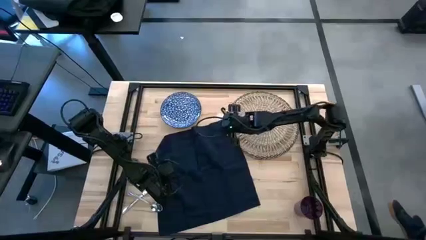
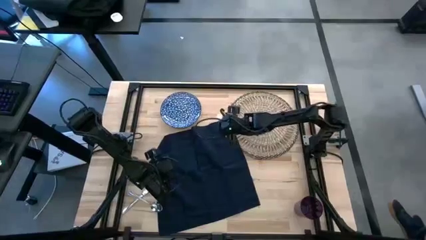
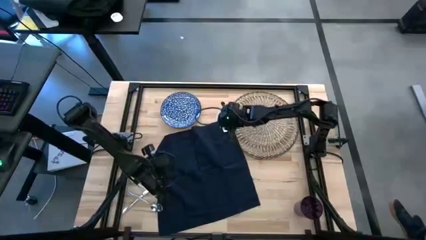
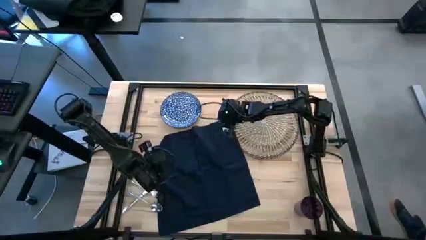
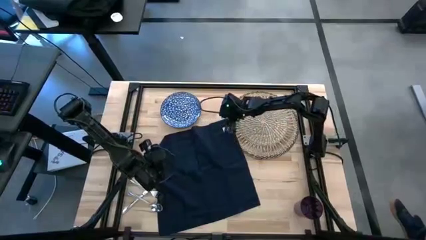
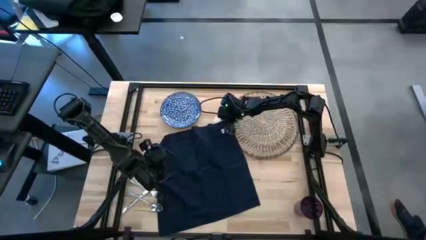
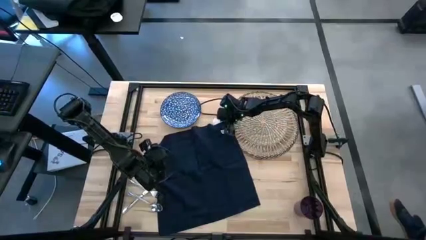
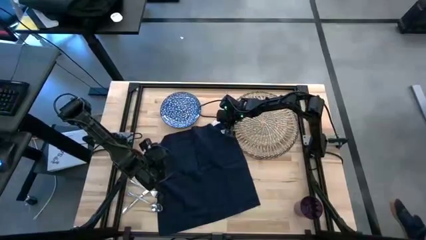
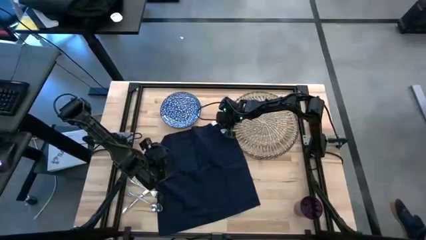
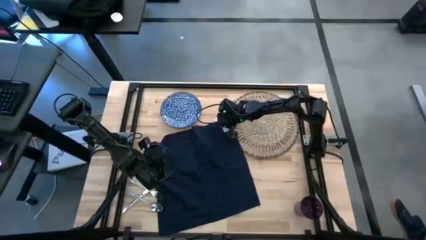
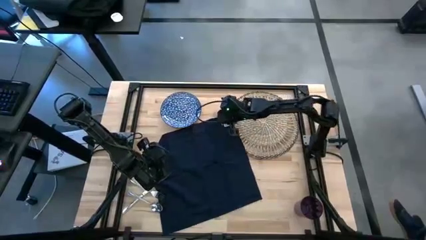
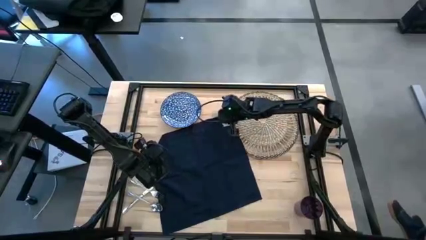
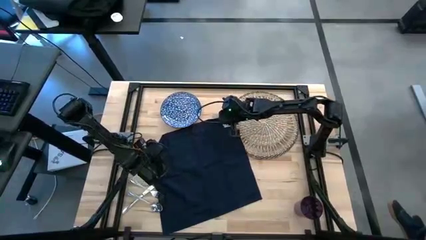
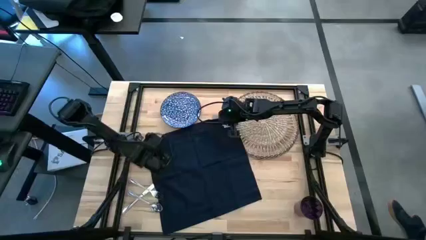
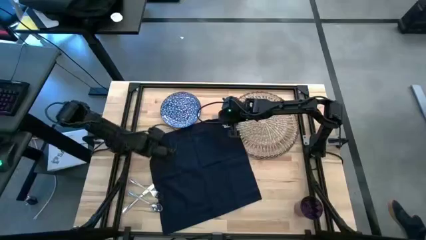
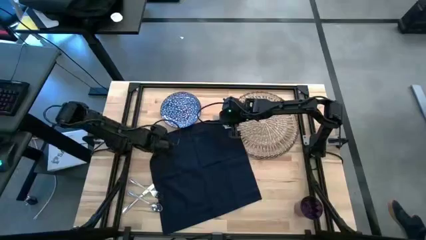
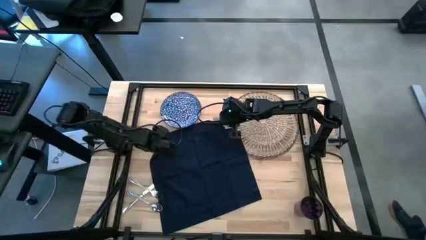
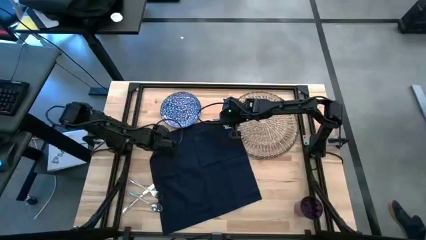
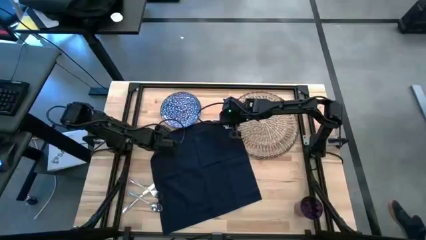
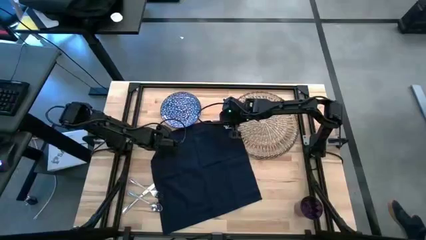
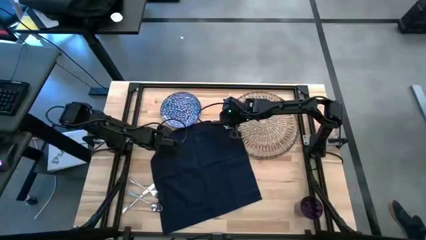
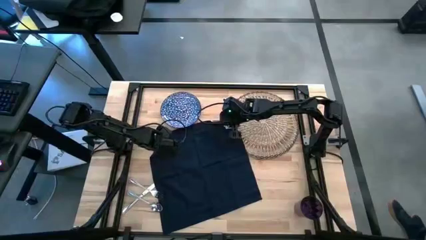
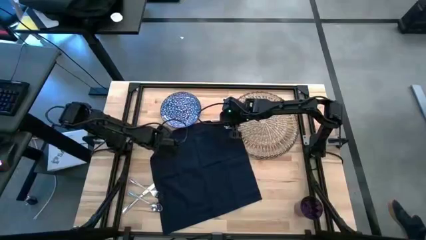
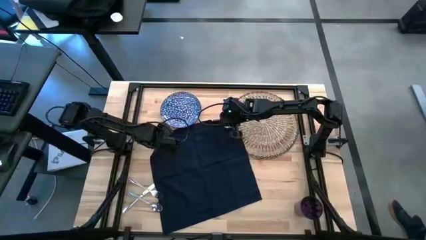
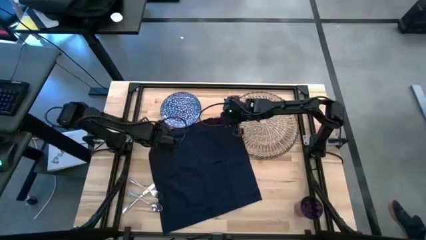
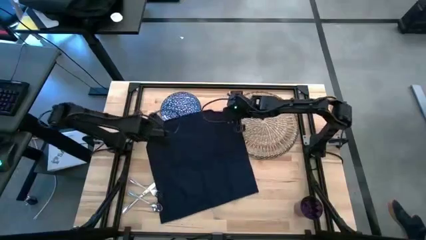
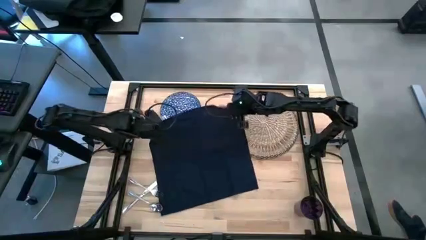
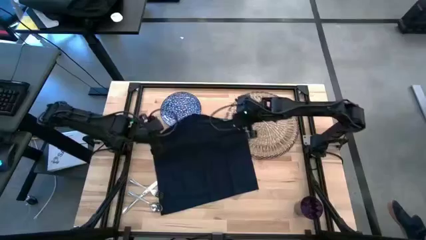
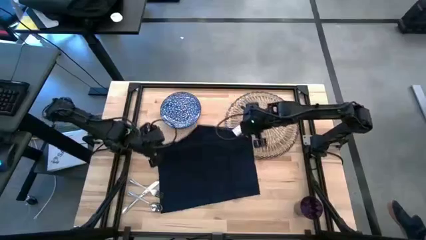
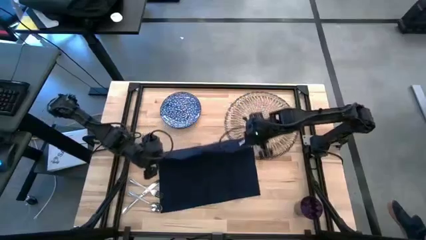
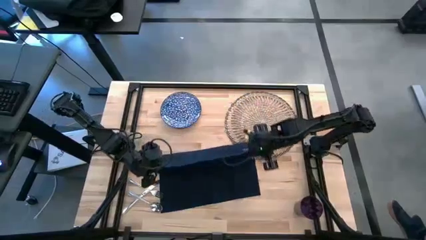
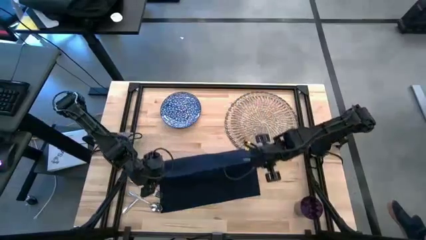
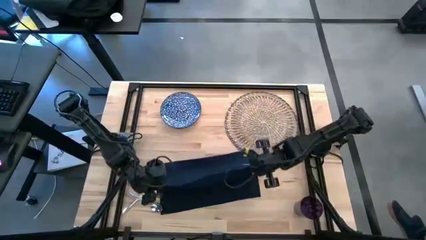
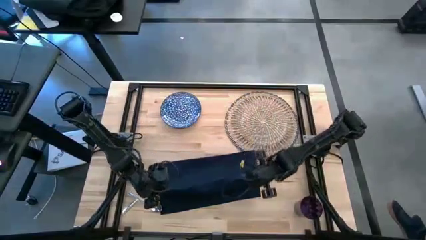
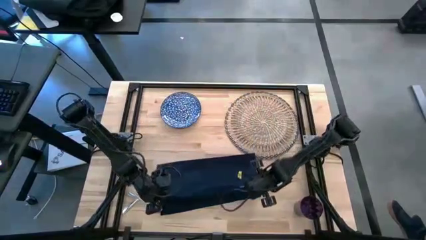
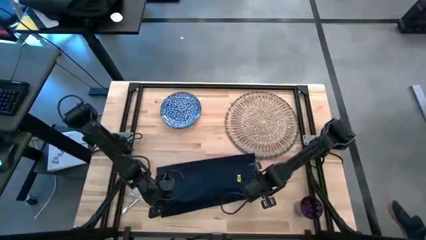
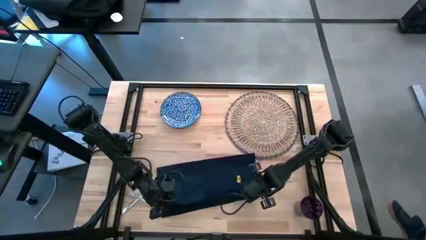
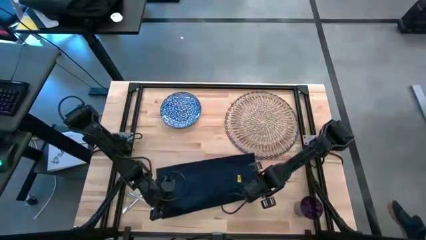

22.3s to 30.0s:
Task: Set table place
Fold the blue table napkin

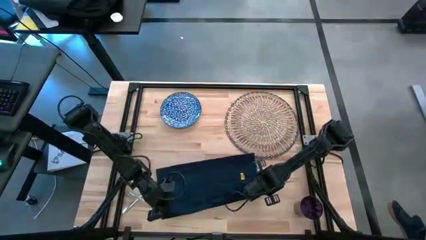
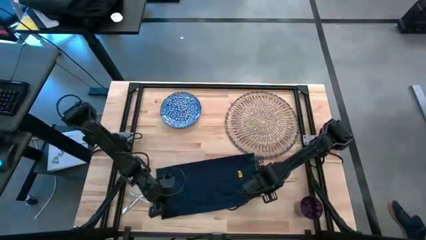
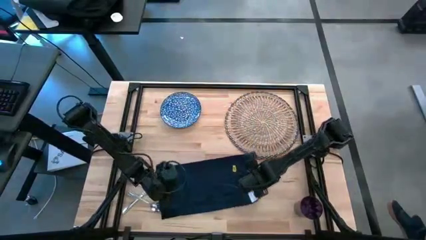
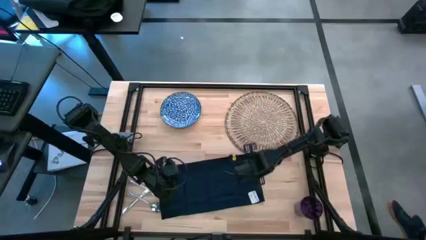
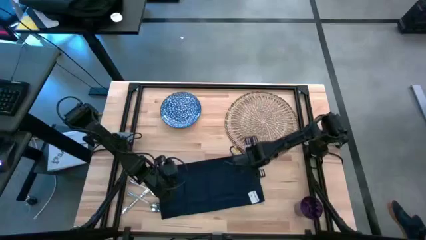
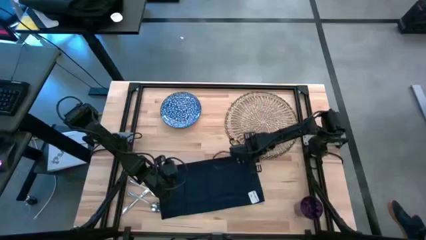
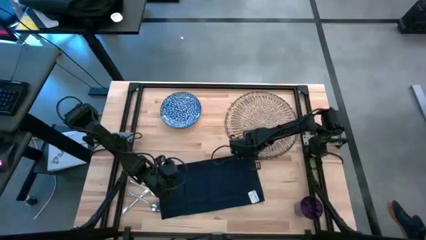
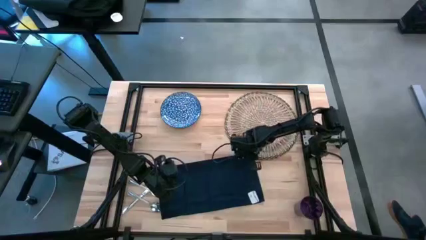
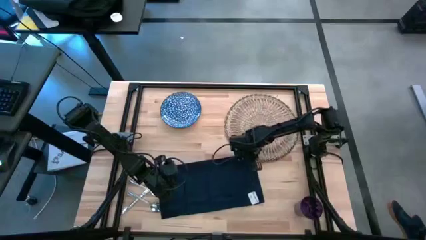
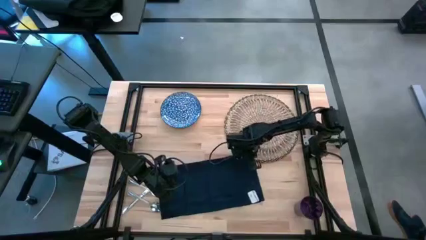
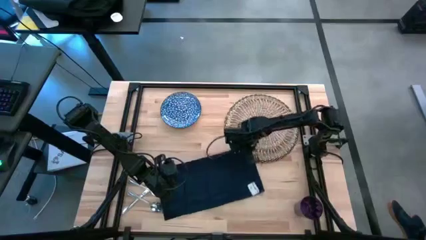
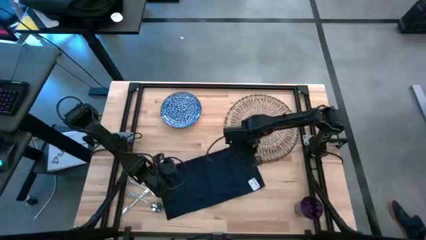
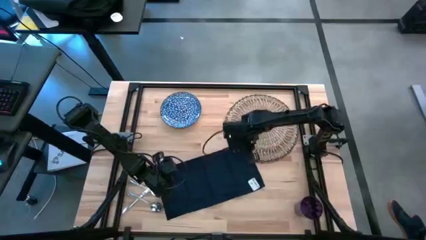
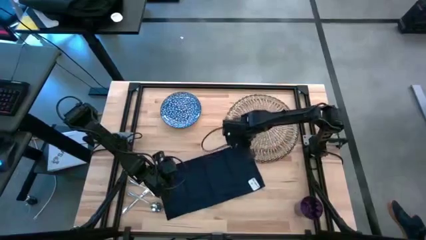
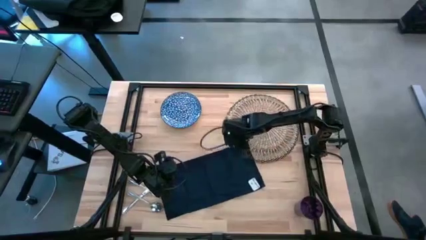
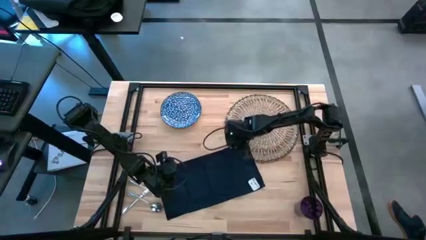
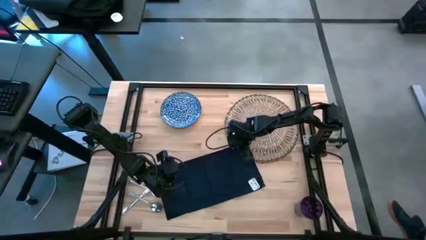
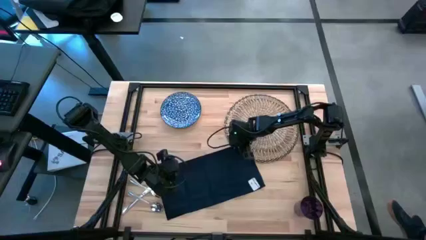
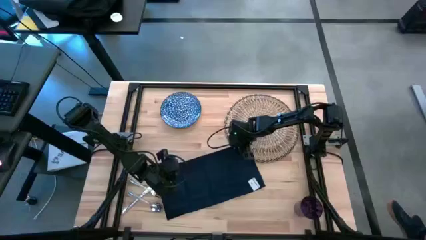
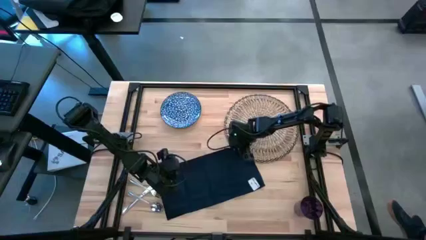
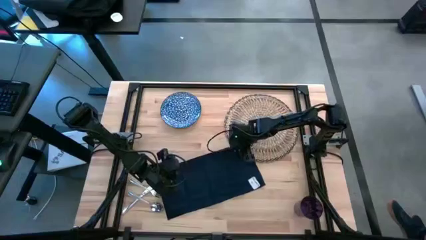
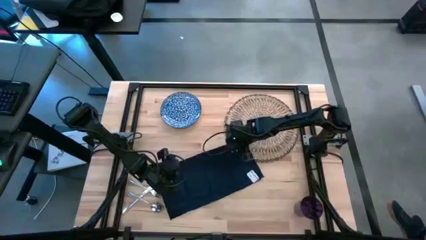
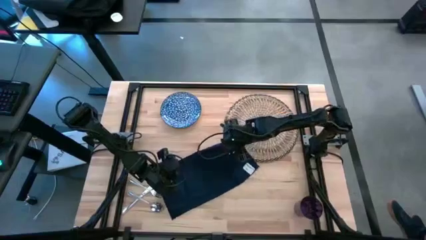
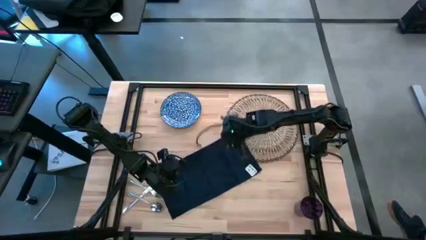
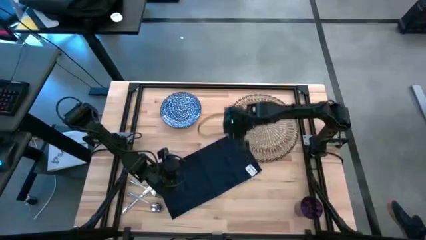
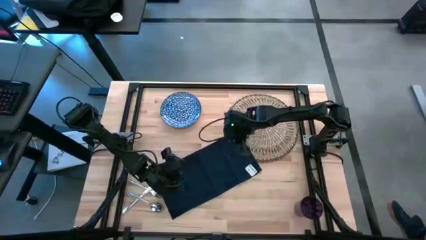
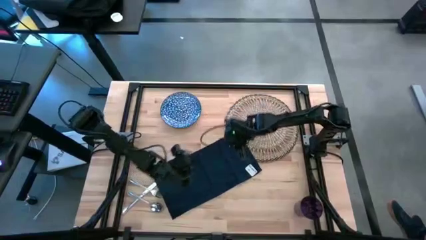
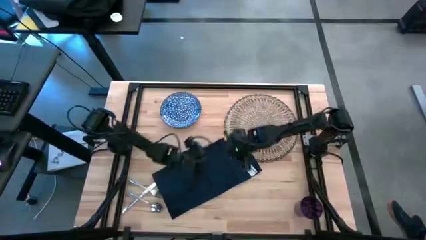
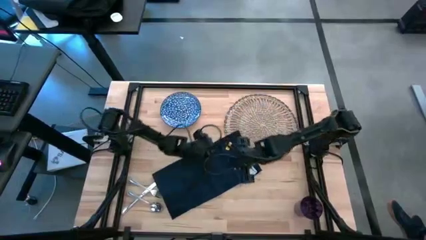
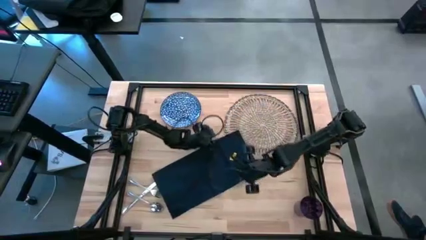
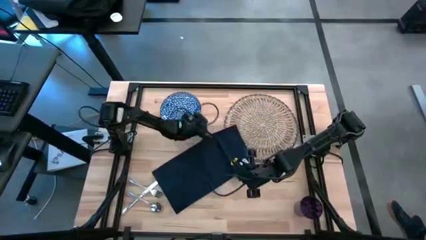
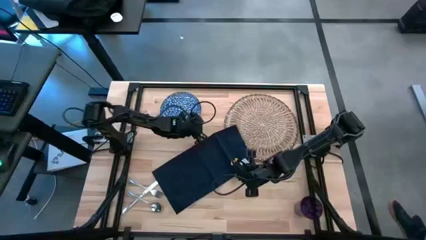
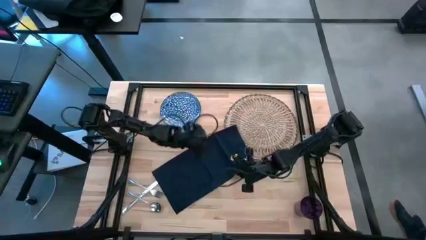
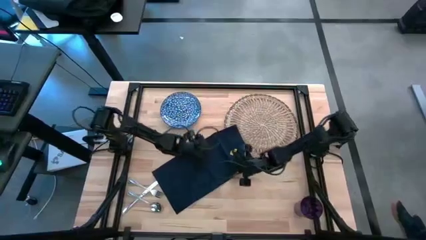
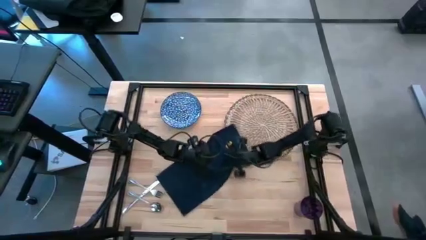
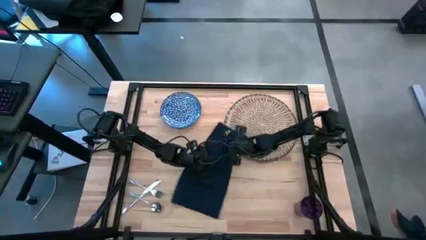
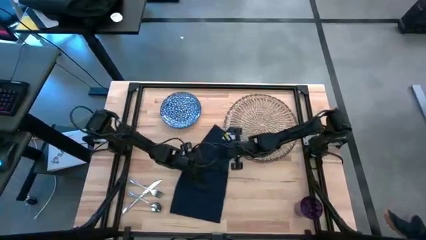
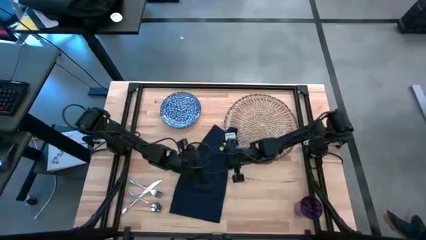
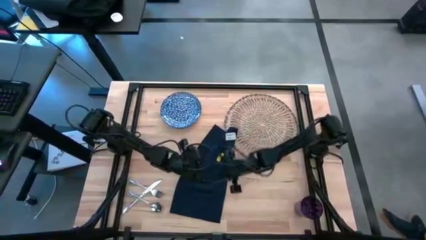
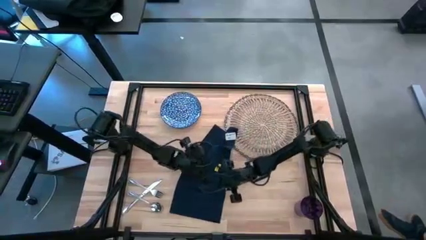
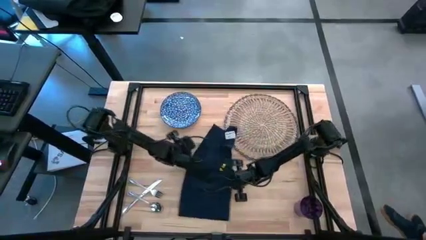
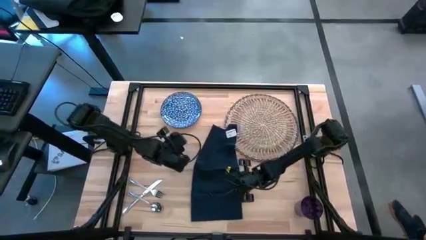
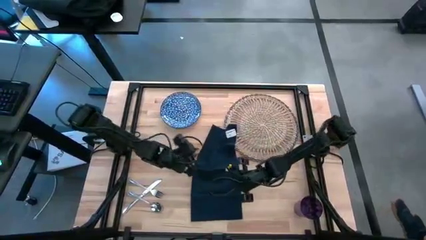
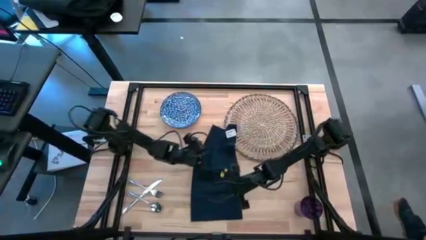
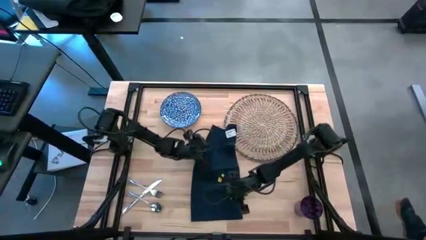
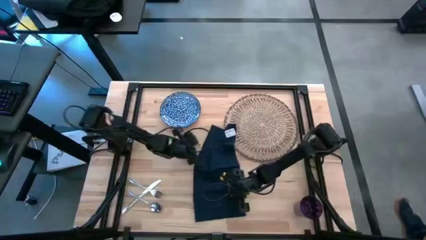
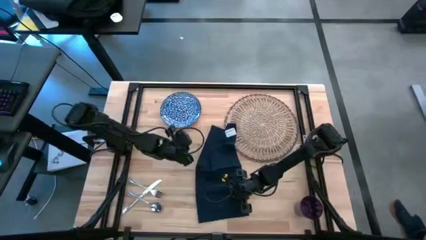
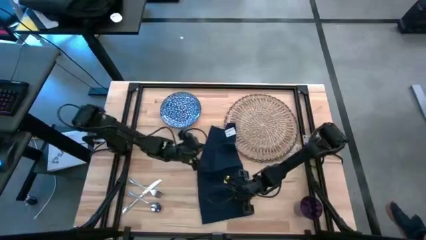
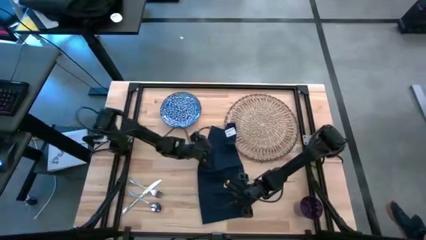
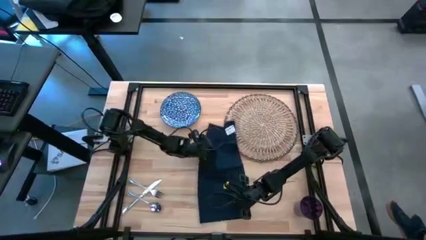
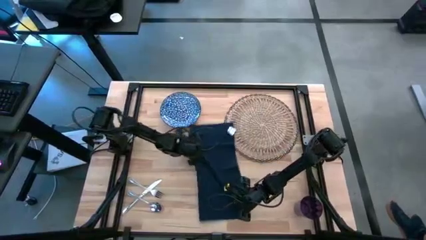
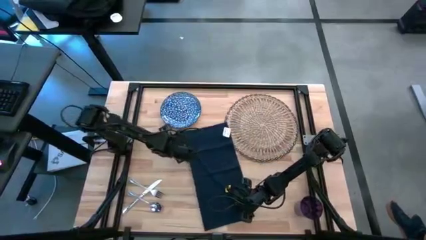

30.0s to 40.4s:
Fold the blue table napkin
